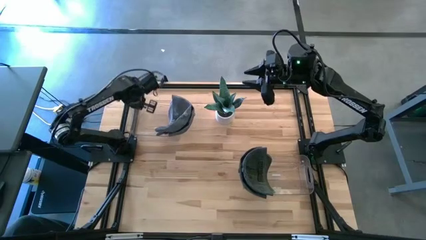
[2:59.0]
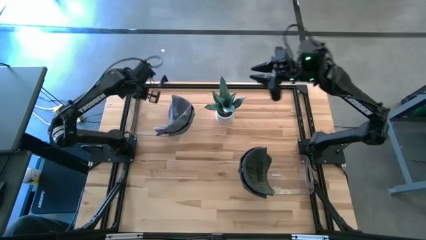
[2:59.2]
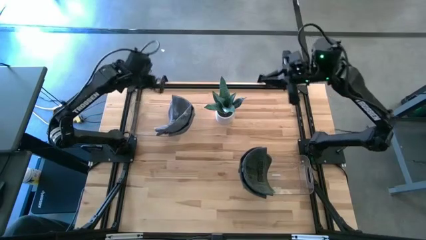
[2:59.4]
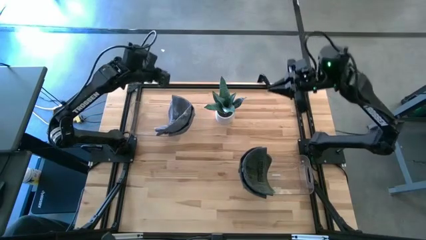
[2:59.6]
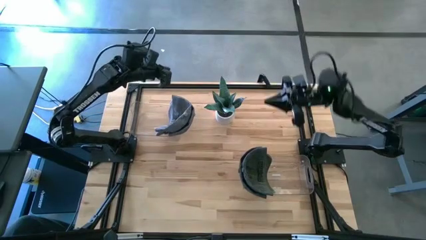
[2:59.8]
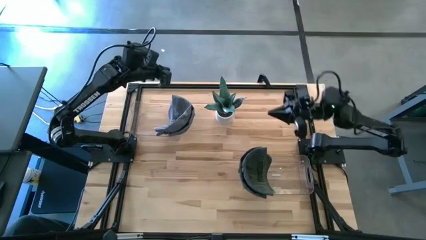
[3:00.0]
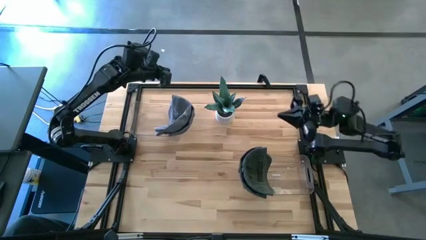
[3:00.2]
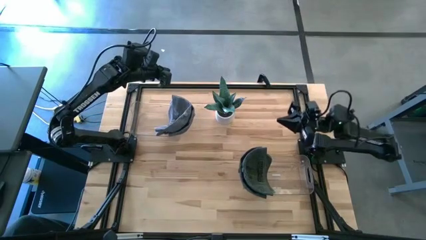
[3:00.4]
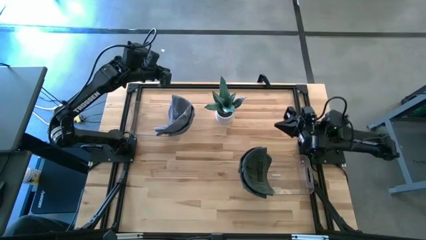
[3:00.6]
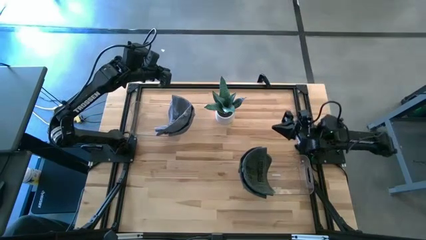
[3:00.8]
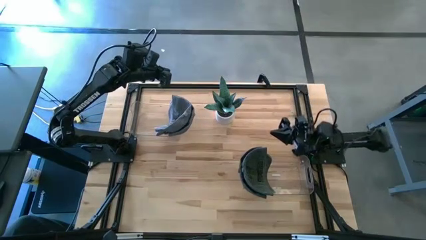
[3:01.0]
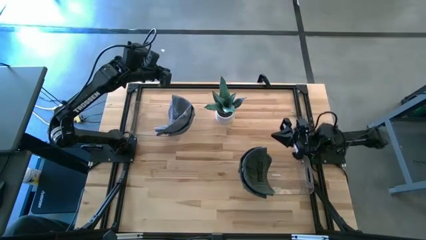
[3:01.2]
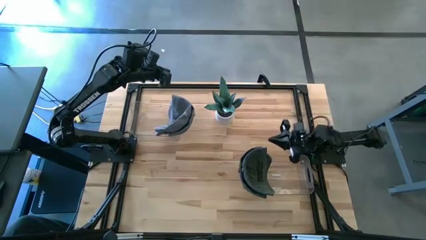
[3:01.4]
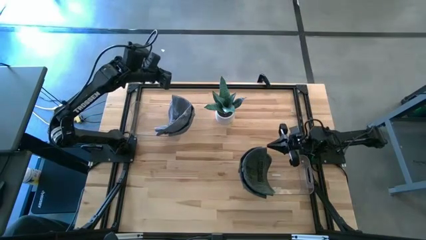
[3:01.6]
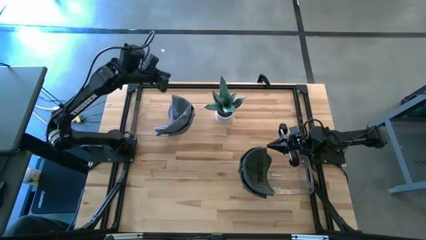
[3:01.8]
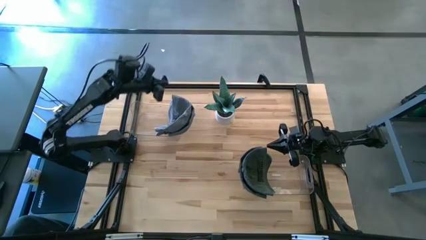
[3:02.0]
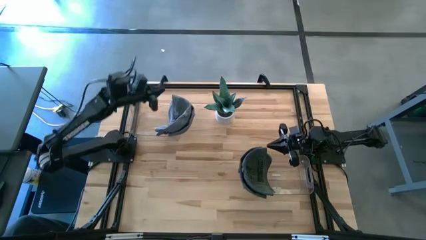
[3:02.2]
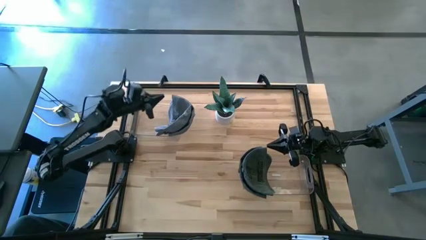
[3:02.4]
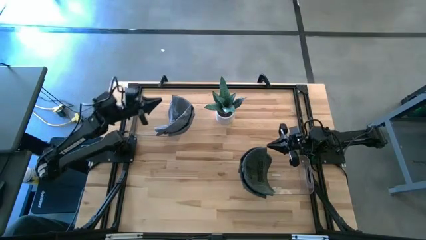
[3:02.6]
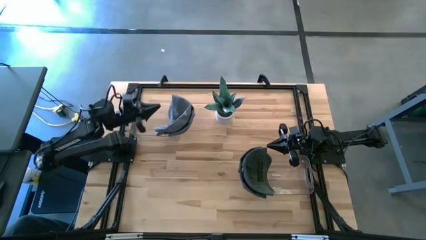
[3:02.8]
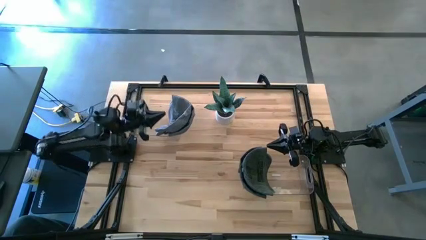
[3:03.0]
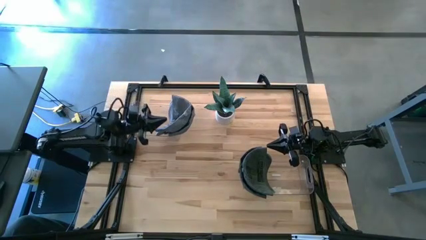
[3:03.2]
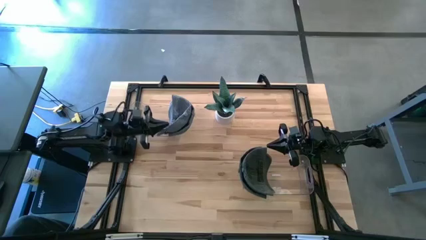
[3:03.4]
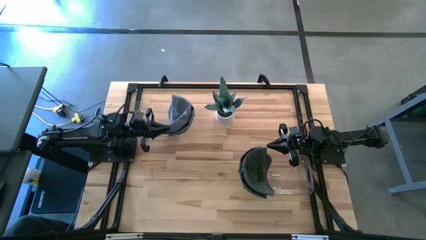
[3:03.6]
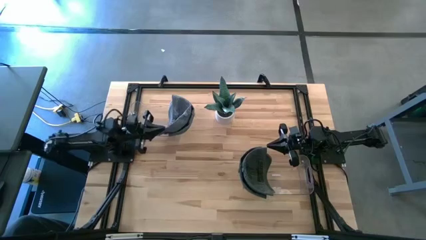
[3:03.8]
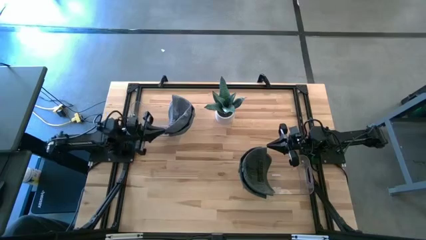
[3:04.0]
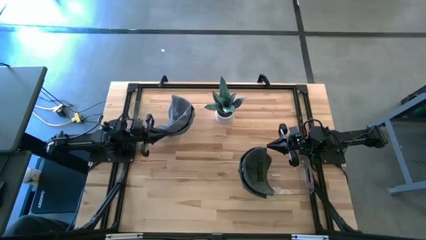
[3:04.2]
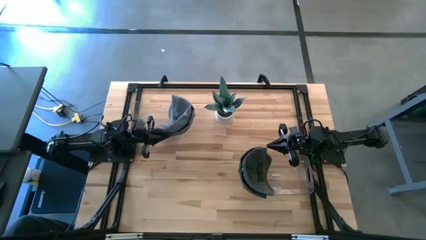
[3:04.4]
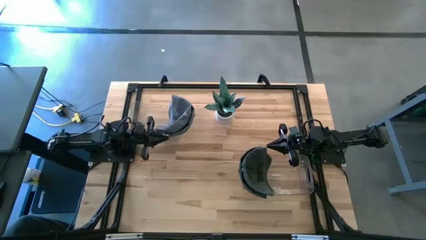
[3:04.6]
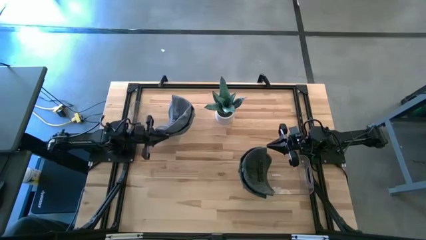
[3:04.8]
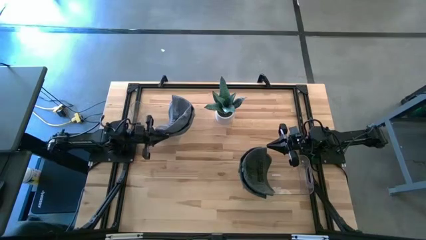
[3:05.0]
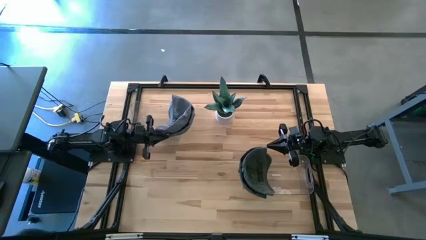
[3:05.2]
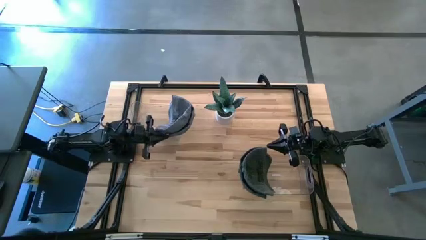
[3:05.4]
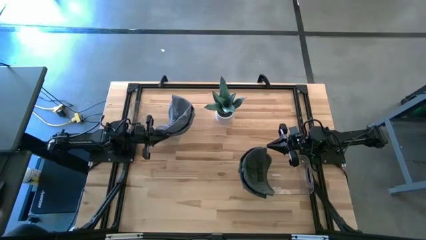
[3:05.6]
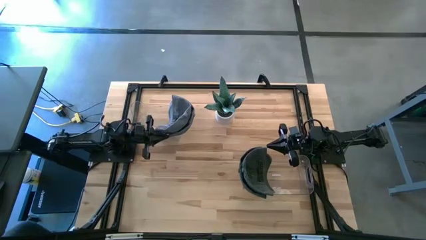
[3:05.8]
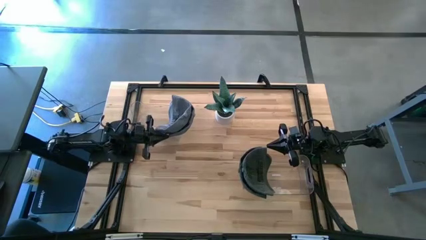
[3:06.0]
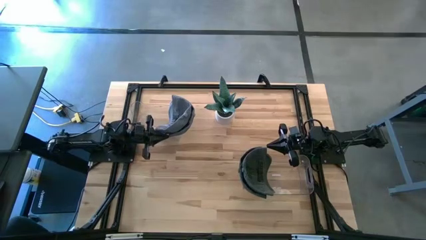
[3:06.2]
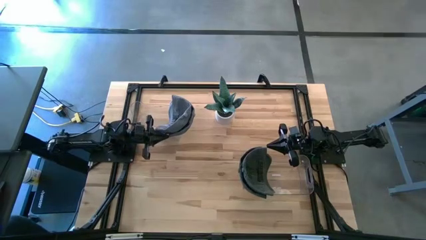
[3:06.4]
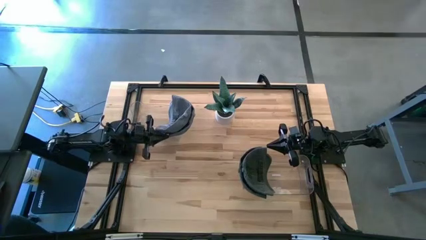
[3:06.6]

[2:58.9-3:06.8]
Task: Pick & Place hat
Return to Home Position

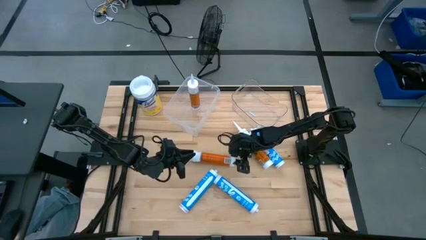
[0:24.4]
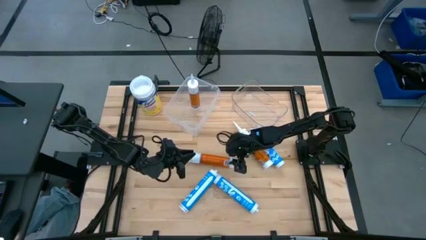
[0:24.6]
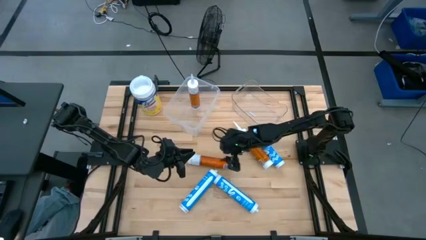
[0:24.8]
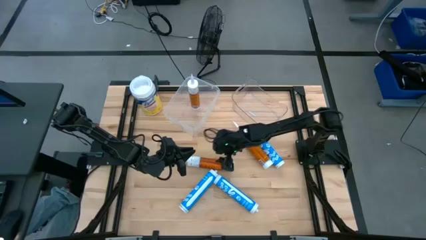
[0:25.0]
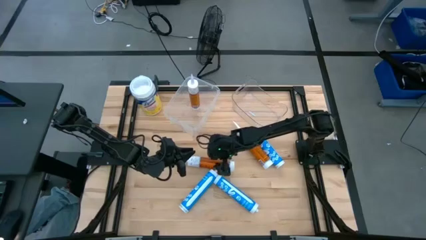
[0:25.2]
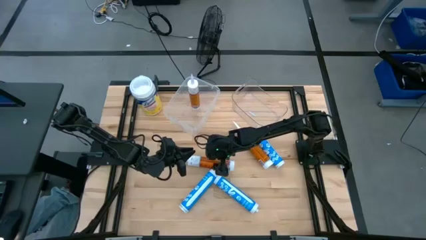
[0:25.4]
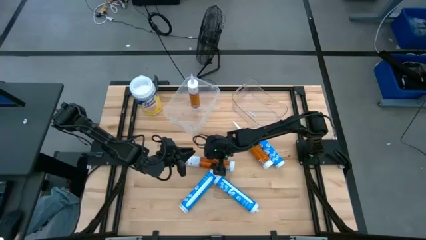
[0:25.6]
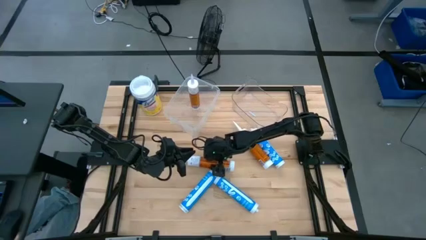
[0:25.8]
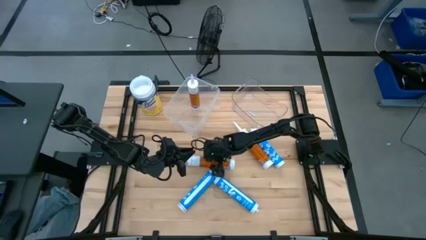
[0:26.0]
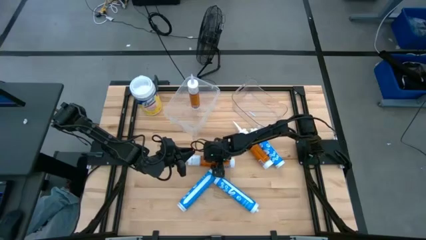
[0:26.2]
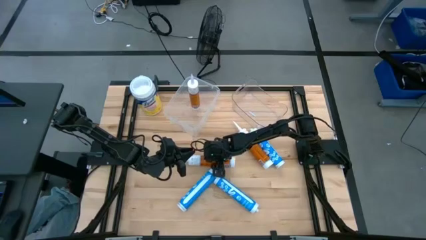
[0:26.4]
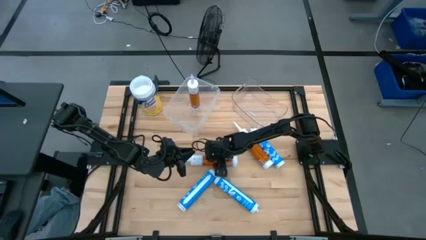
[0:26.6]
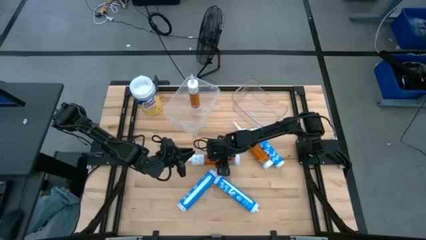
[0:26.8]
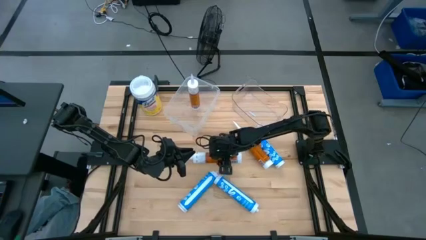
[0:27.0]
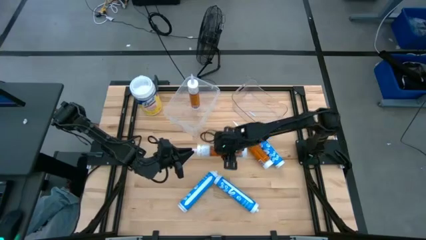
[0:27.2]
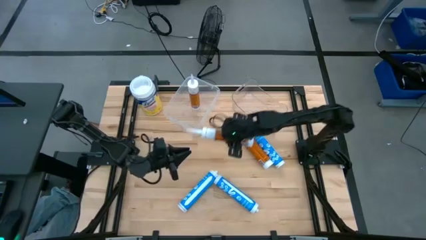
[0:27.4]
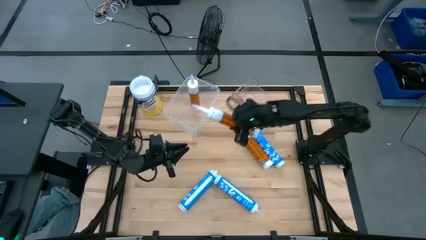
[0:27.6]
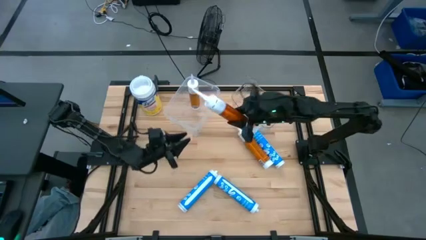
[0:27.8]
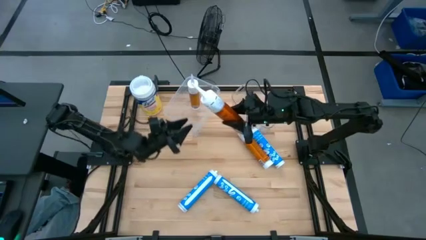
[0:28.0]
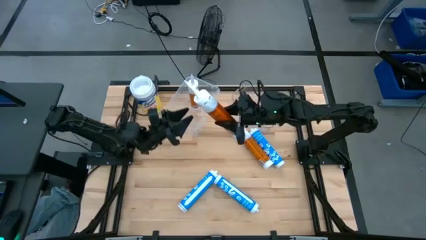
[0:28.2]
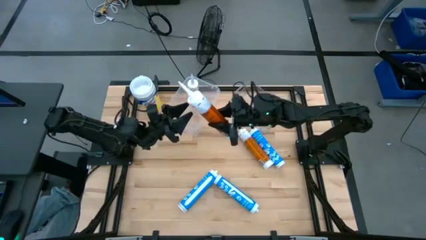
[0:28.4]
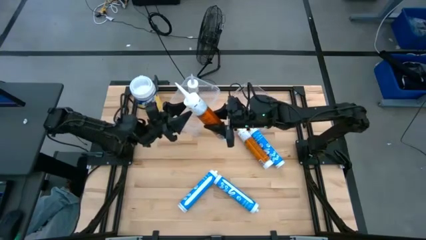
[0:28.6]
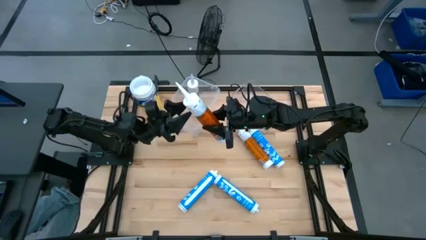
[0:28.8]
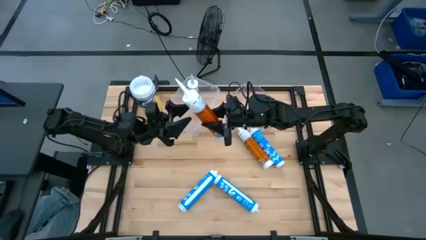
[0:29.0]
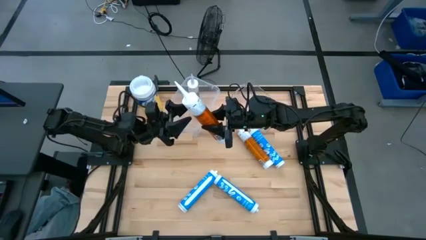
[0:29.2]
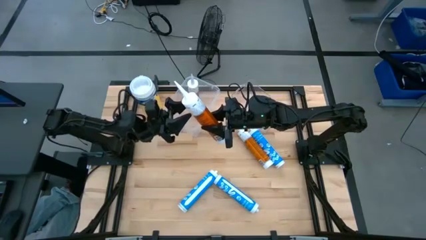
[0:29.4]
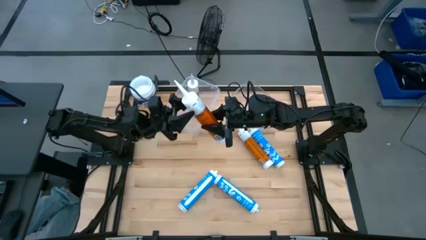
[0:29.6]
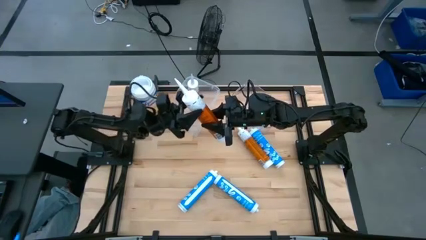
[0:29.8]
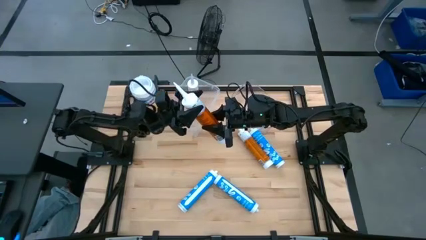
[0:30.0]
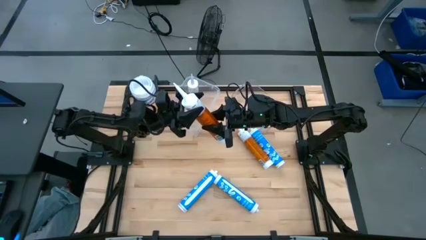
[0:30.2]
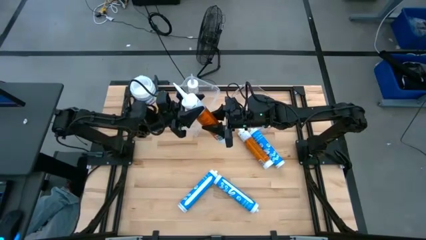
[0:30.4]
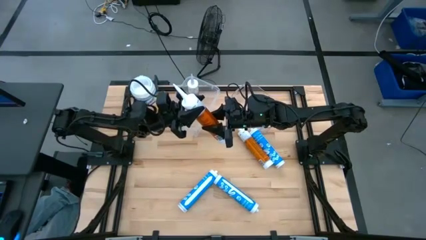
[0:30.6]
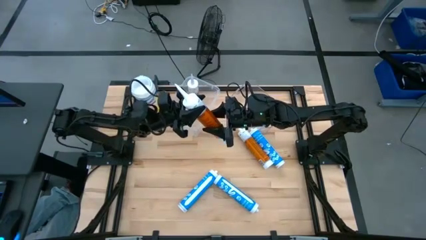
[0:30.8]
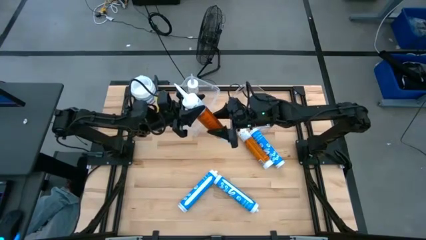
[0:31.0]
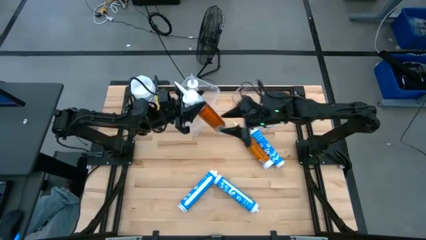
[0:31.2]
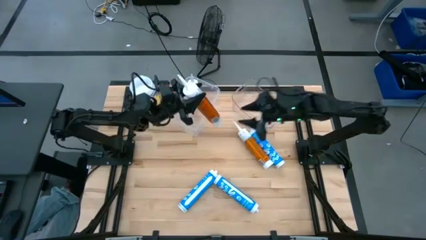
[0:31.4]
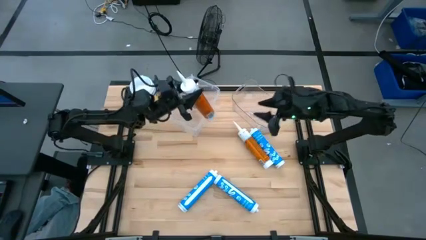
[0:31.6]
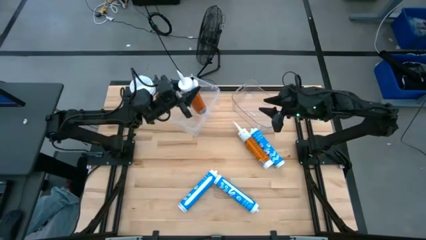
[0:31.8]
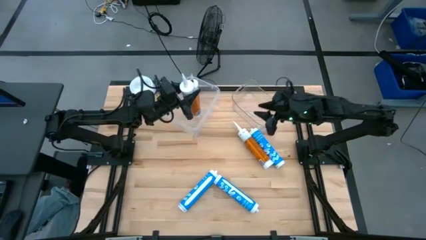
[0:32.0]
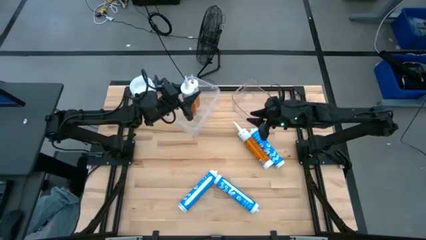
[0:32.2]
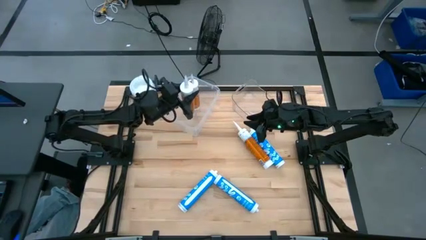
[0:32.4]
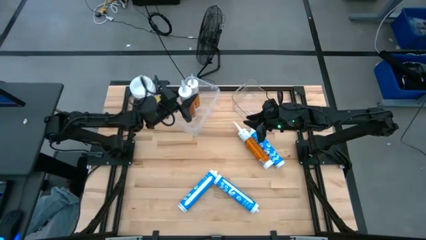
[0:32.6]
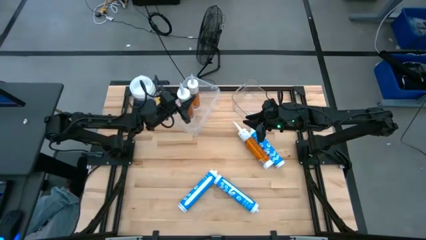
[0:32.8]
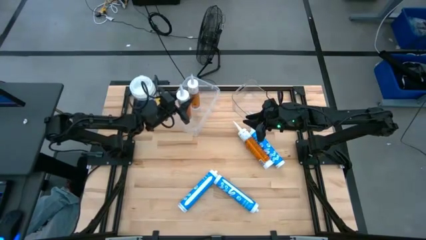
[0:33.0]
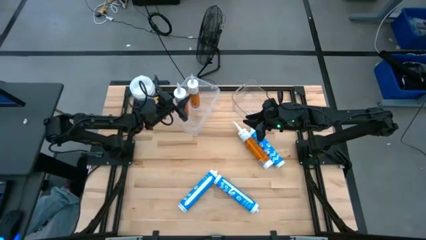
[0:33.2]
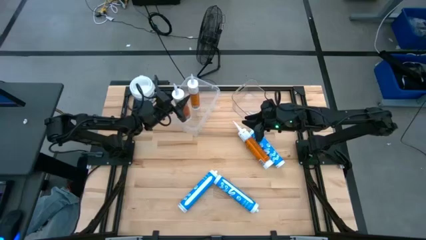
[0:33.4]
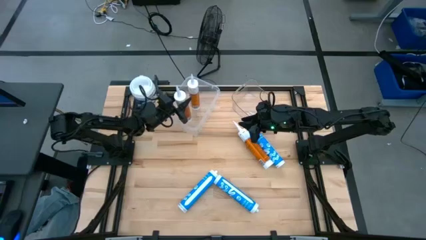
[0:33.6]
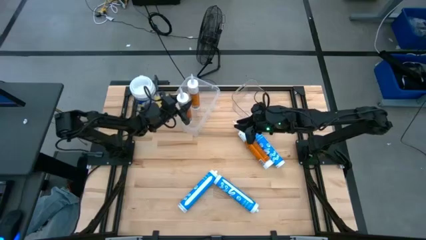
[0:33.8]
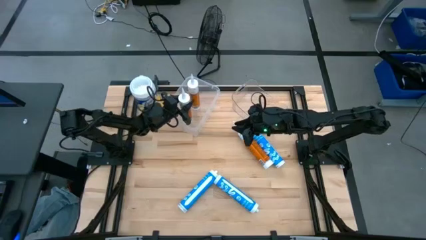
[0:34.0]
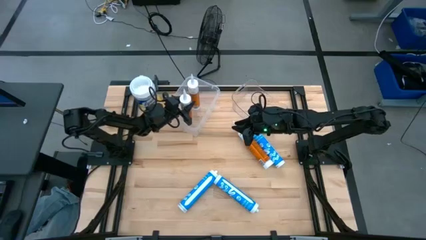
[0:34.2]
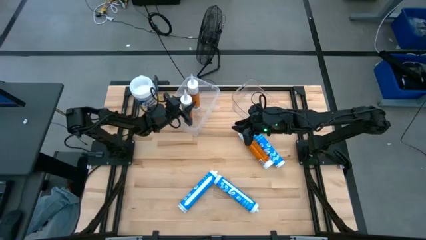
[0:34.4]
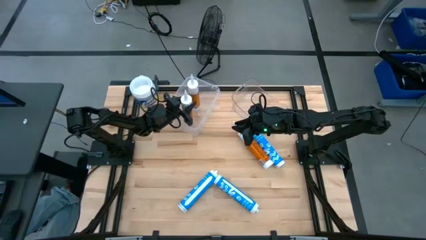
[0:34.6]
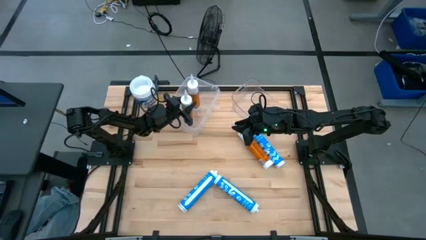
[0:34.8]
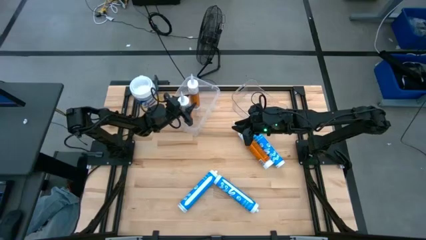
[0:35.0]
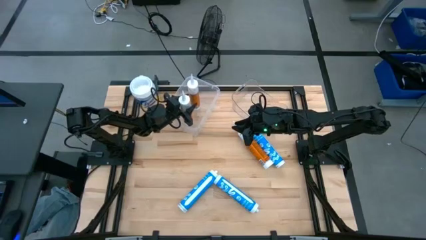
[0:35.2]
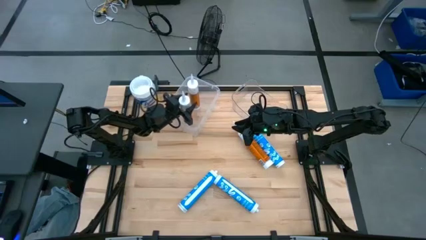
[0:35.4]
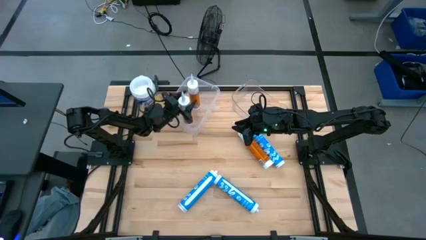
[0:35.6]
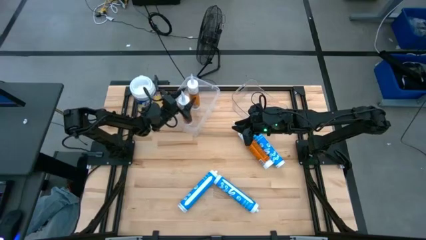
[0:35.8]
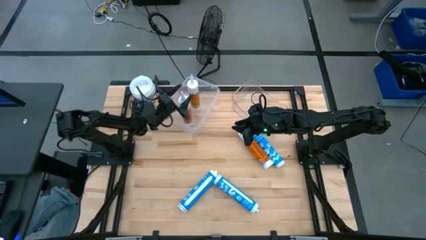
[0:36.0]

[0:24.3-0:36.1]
Task: Pick & place silicon tubes, Sealant and Lysol wipes
Put the left orange sealant into the left transparent bin
